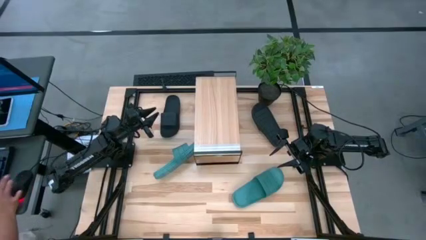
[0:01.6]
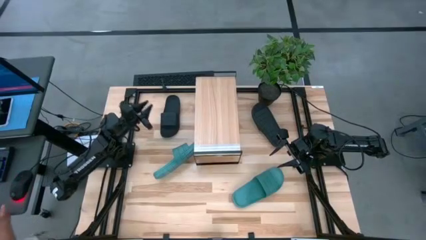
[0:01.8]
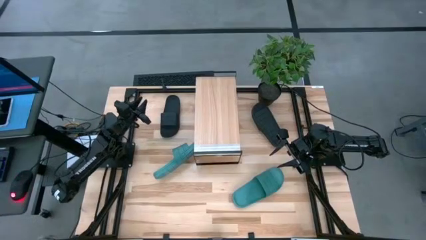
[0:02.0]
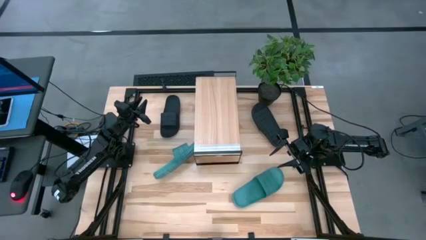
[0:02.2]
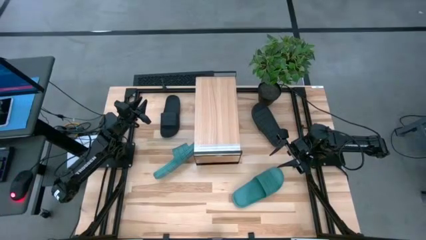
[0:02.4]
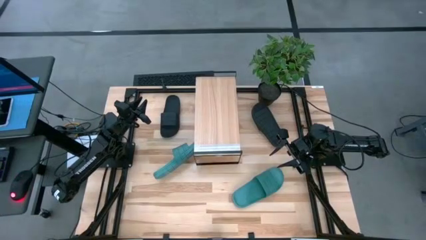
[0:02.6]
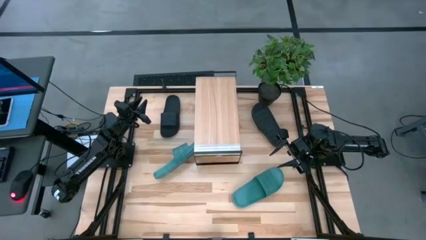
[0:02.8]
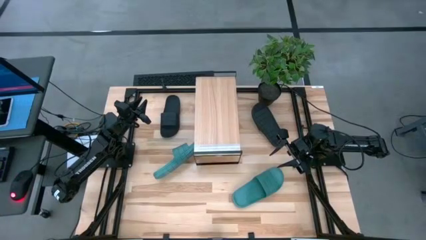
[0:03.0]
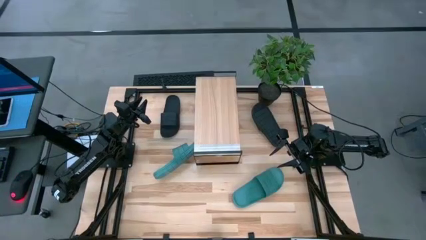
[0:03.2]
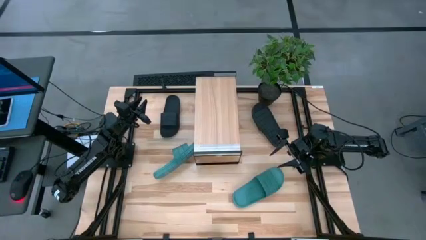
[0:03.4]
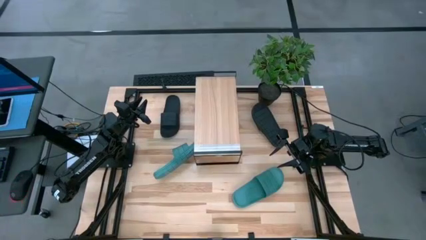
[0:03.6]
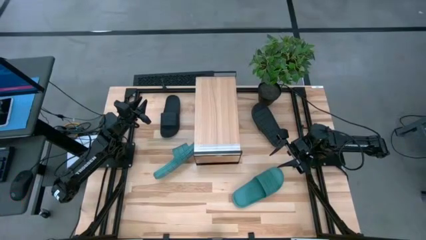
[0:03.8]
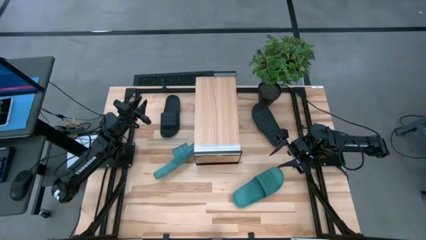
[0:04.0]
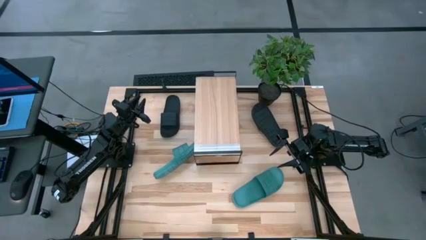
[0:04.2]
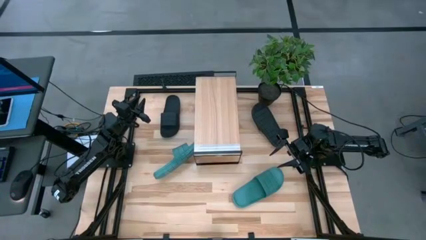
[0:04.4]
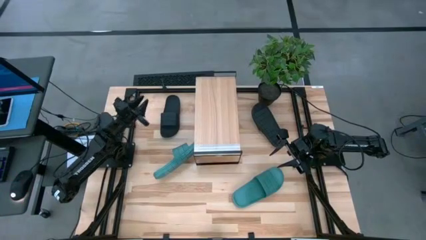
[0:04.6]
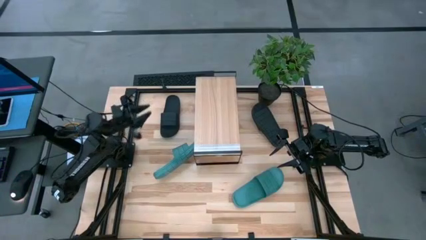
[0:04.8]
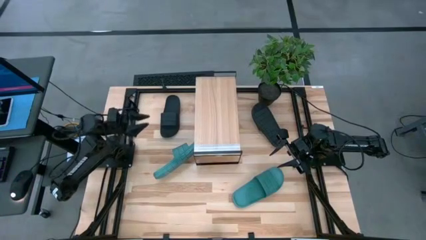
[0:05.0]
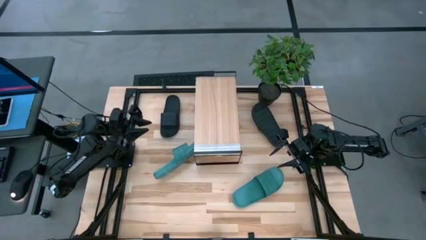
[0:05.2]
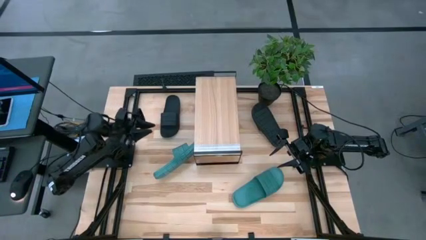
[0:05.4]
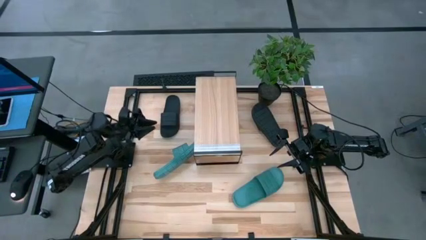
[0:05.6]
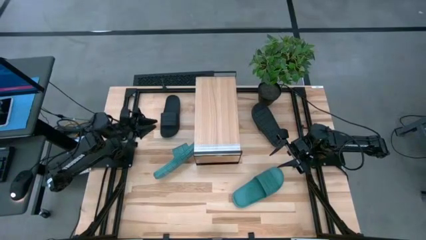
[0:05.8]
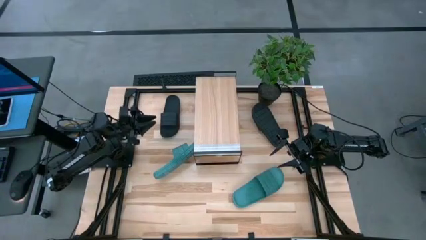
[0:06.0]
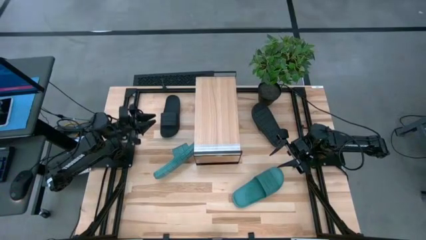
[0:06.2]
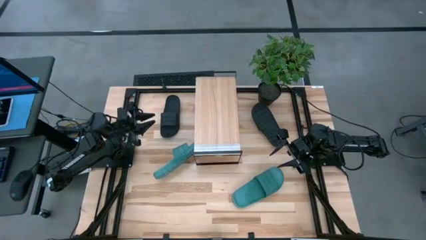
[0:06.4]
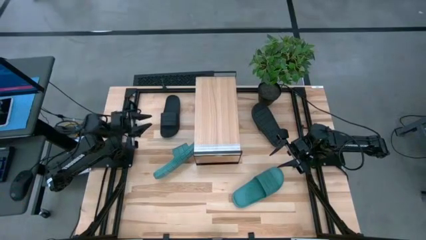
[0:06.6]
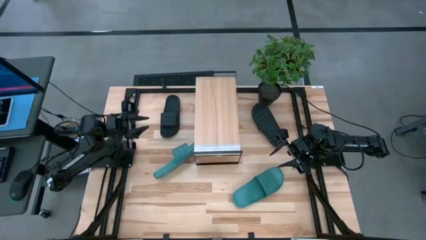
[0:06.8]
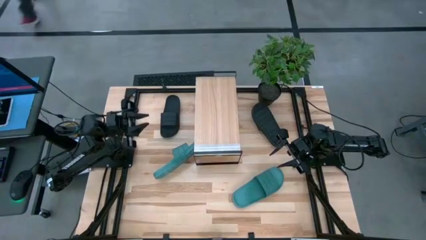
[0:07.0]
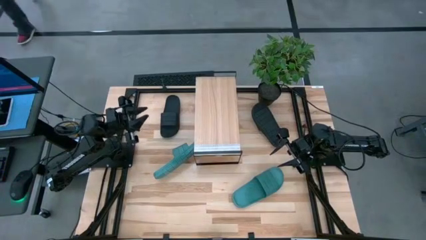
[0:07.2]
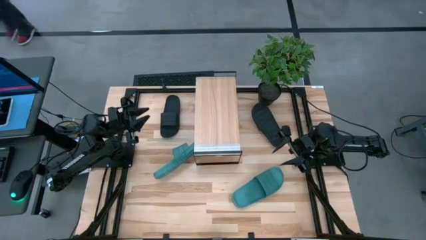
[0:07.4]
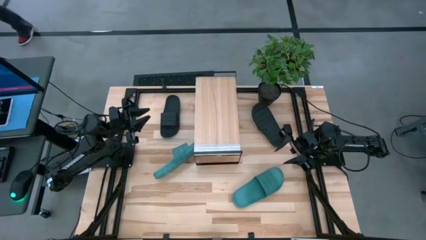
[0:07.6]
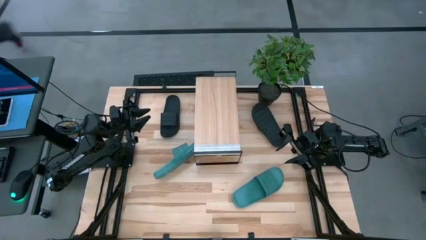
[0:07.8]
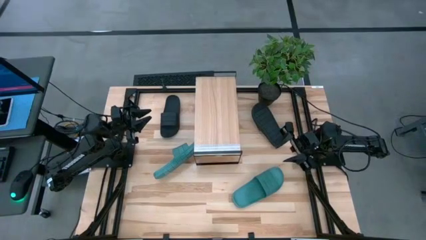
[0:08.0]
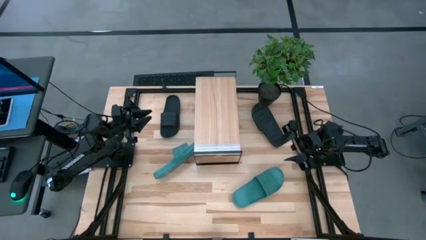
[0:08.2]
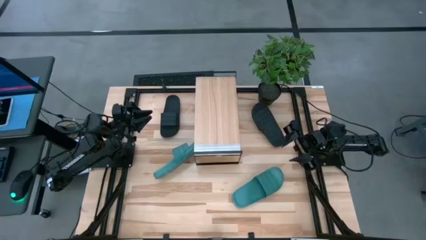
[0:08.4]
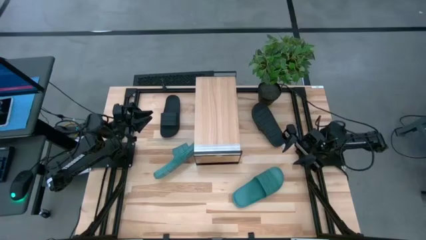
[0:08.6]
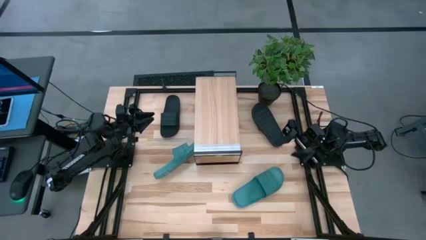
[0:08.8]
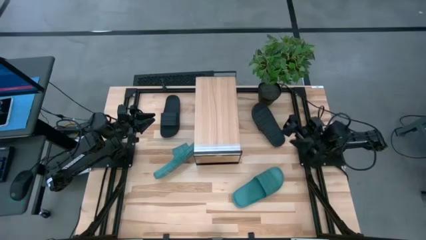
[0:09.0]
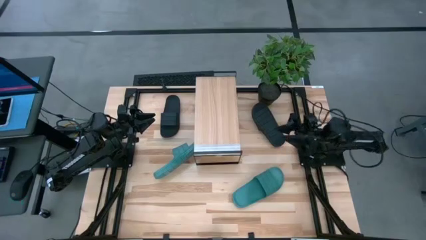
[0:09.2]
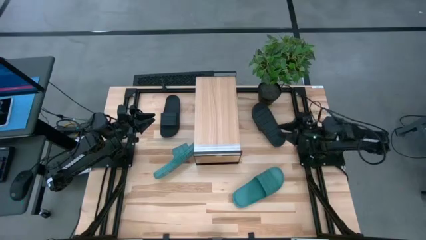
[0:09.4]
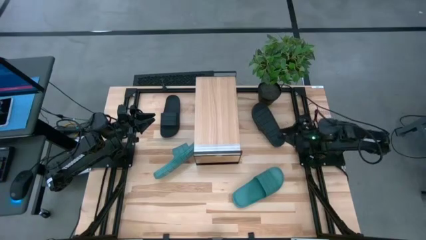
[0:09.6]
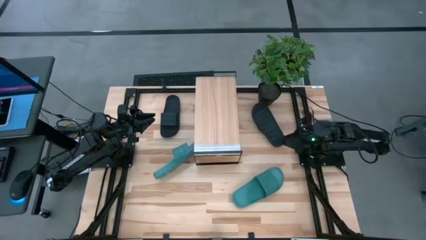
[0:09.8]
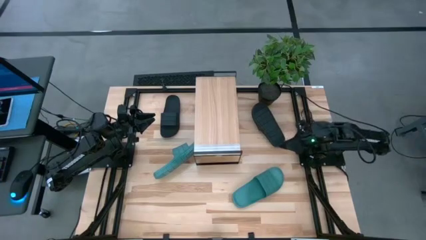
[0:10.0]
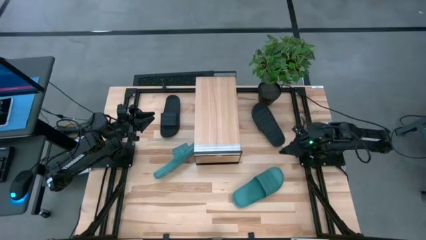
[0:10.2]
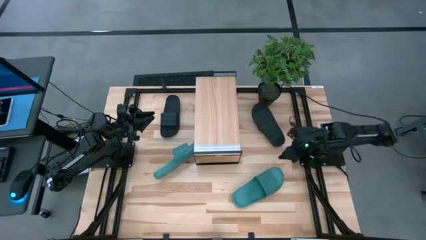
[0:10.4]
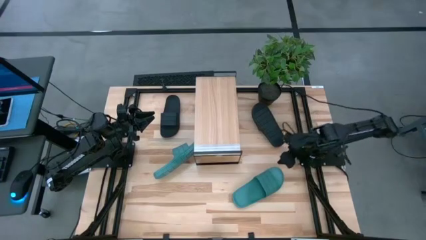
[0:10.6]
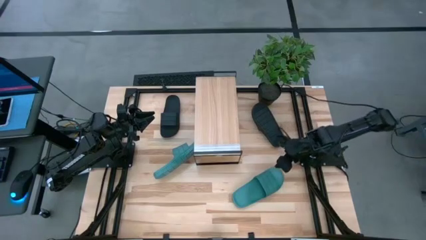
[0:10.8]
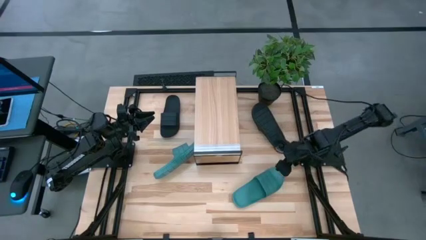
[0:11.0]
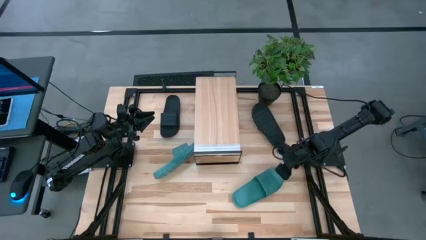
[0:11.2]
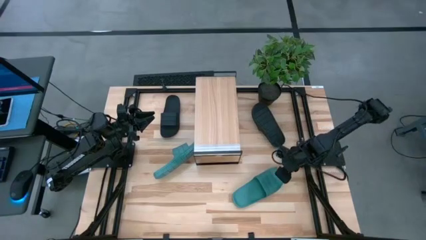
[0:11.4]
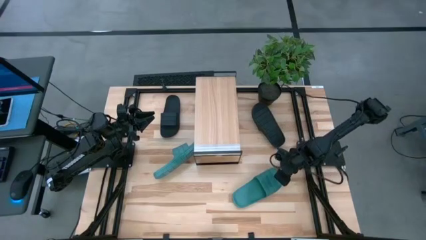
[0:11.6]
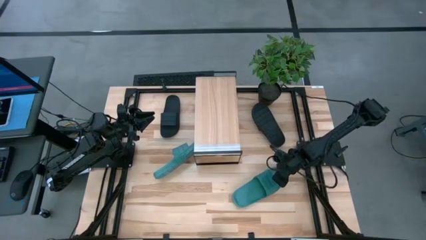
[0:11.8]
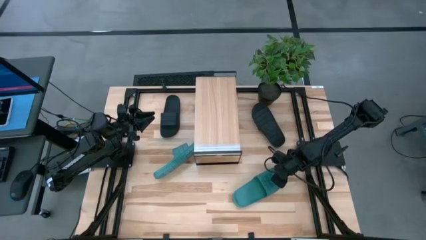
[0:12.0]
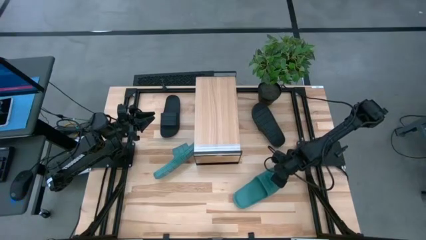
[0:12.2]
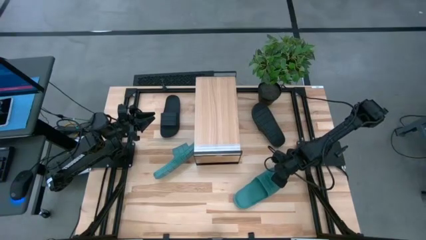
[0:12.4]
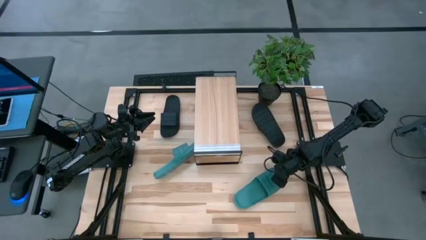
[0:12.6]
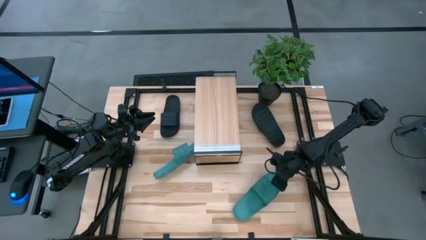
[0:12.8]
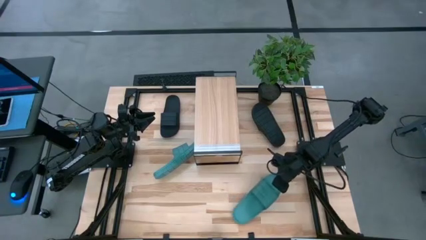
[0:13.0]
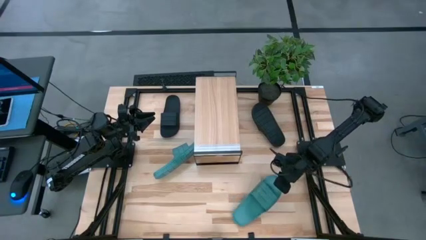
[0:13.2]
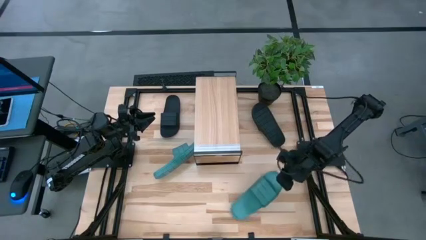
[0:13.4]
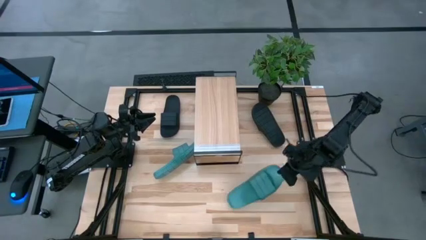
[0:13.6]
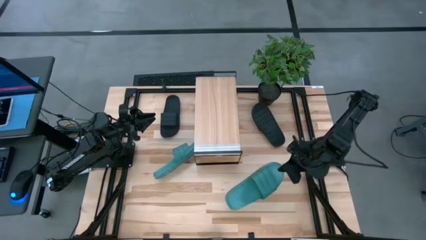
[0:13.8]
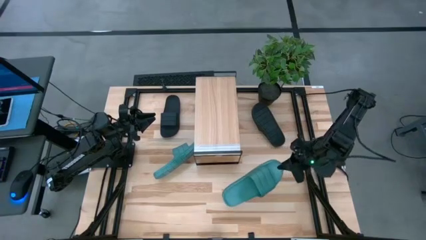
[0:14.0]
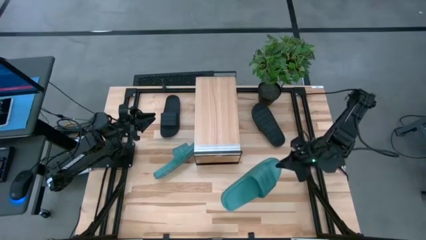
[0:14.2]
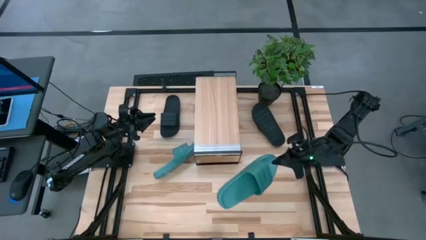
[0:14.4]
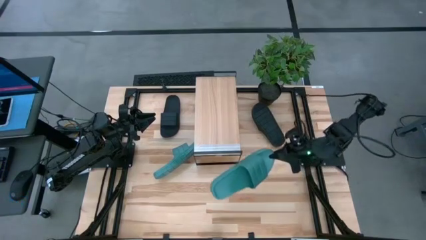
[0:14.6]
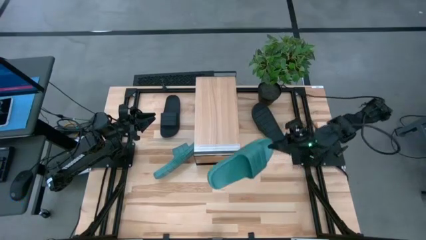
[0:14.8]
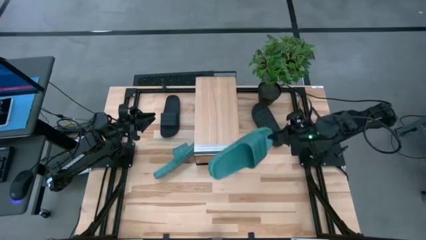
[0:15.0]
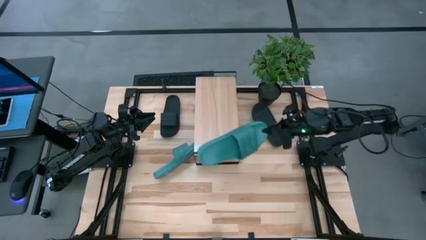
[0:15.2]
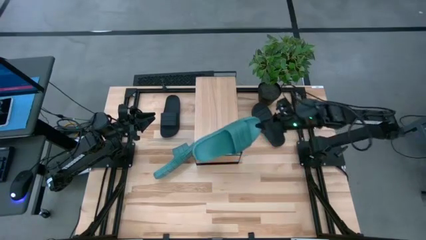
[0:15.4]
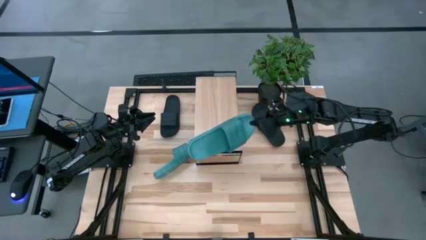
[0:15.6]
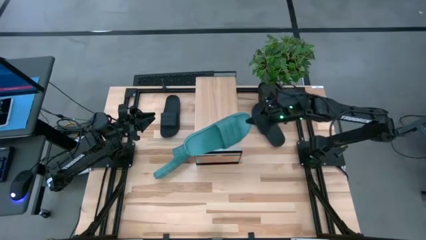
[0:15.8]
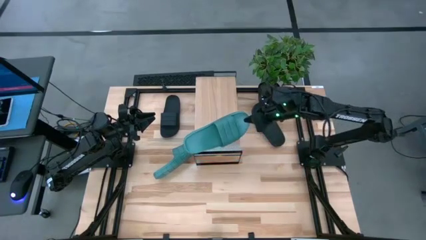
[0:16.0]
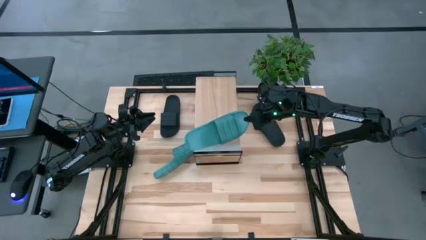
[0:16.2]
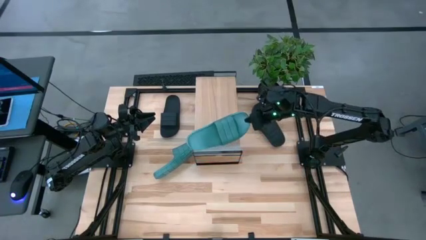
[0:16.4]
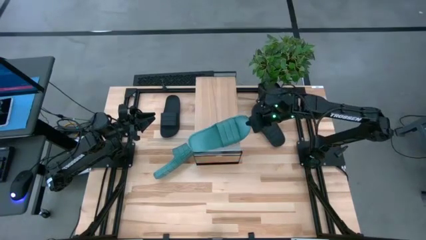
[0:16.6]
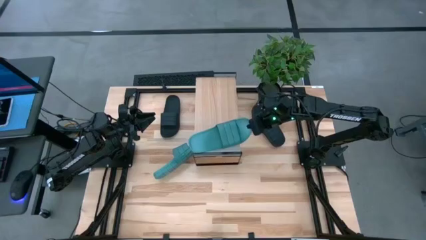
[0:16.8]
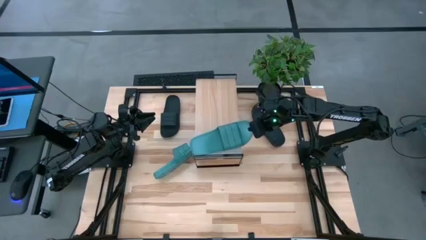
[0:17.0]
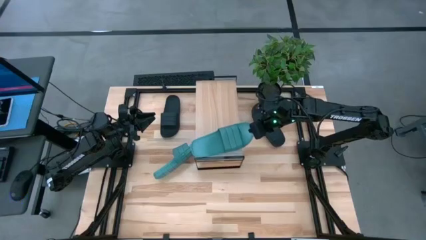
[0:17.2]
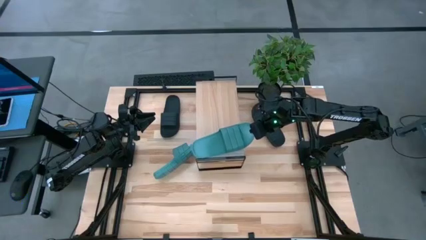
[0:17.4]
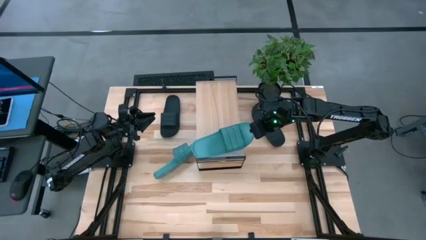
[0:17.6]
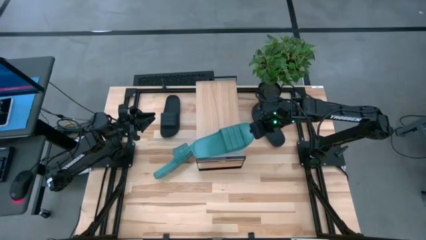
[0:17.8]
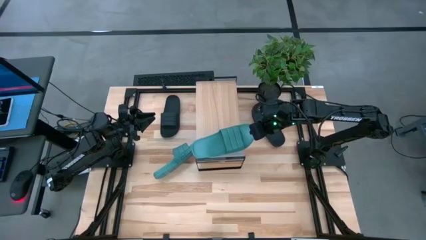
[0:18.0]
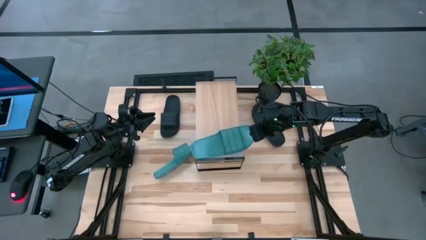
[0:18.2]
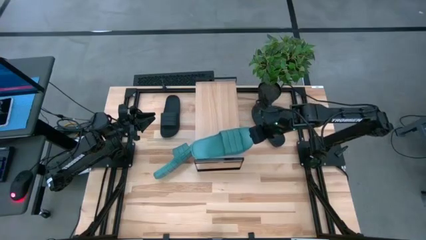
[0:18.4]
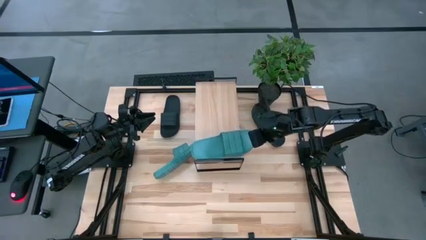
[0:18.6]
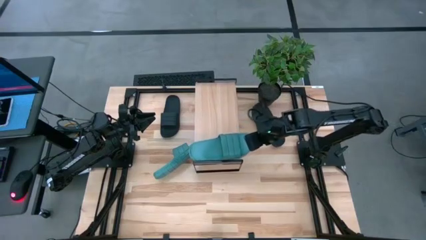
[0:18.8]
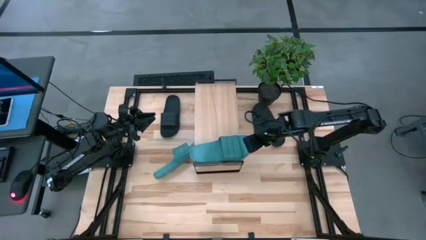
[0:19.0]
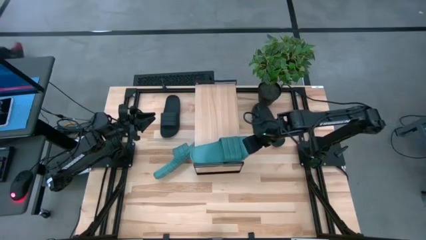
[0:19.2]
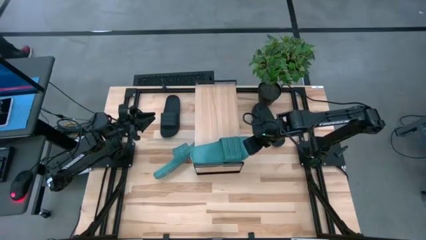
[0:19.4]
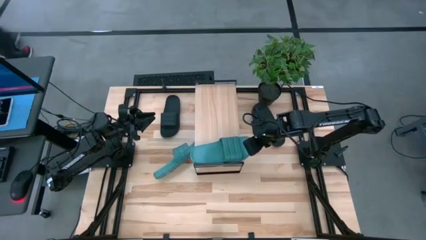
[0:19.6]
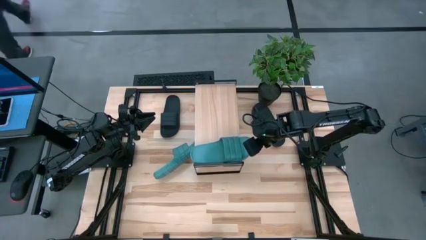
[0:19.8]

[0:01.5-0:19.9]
Task: Pick and place slides into the shelf
Put the bottom green slipper on the shelf
